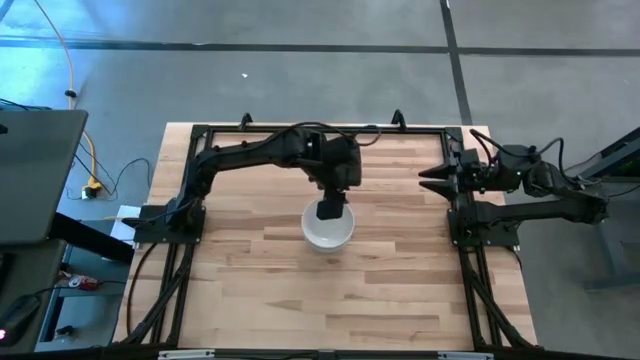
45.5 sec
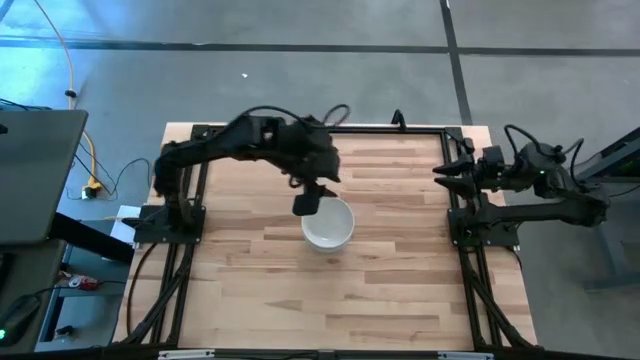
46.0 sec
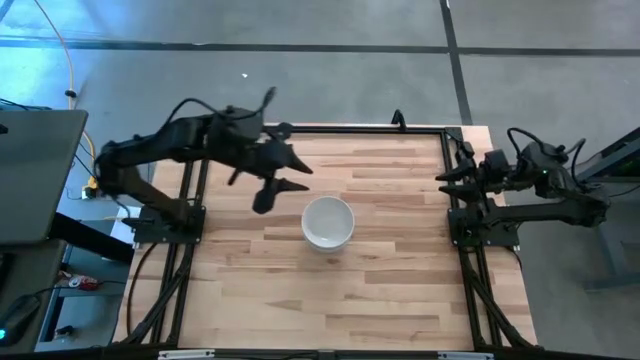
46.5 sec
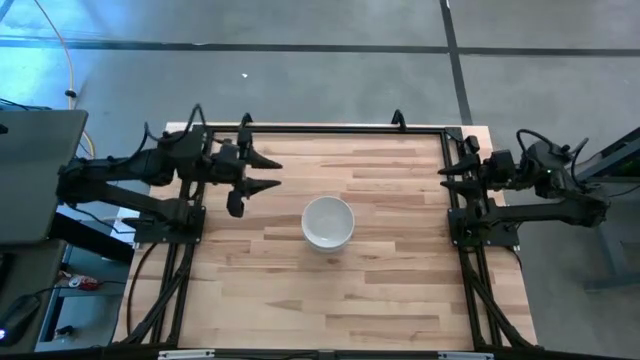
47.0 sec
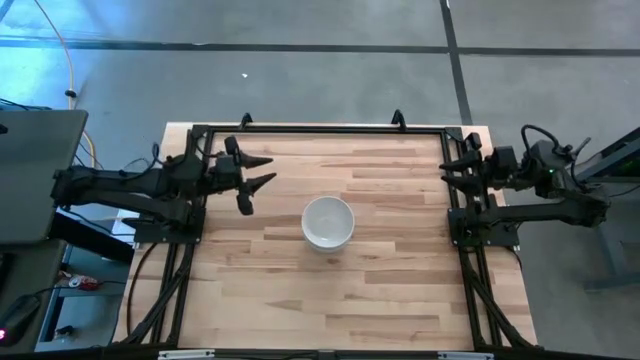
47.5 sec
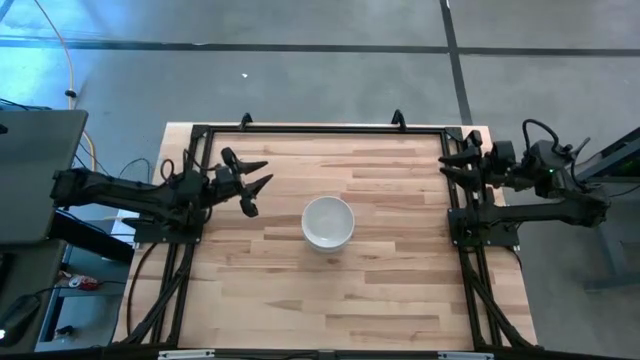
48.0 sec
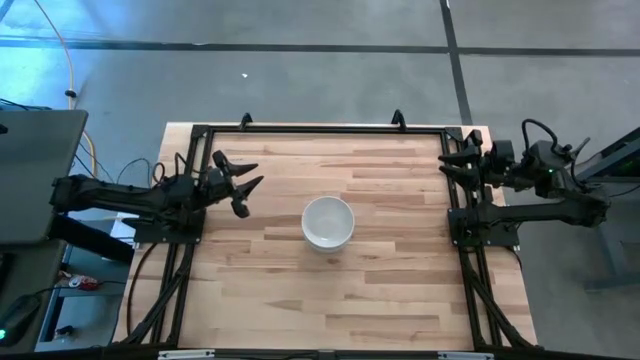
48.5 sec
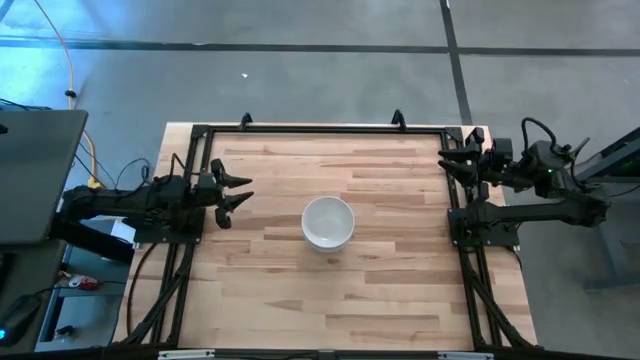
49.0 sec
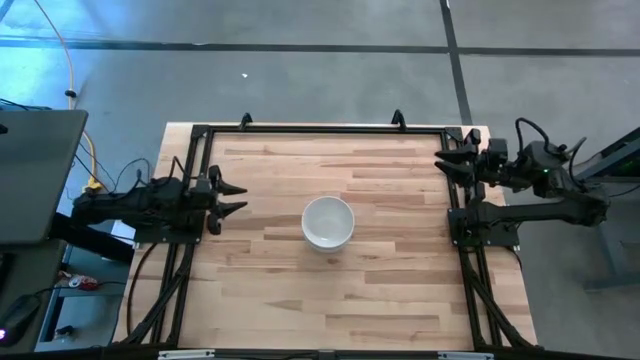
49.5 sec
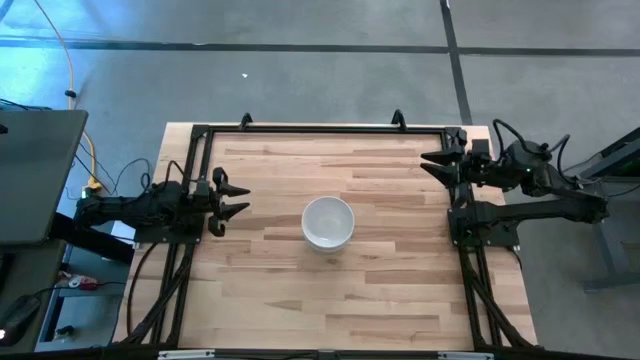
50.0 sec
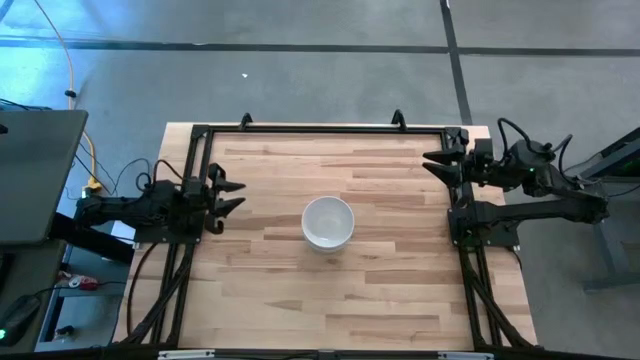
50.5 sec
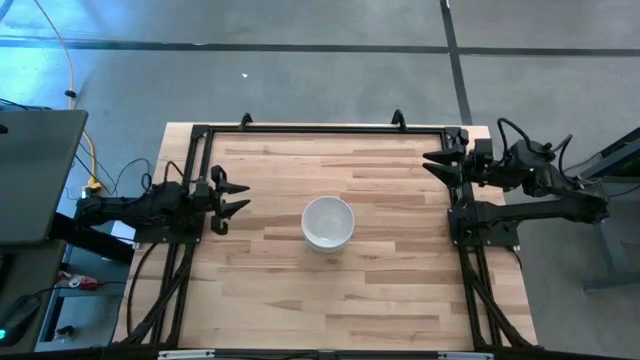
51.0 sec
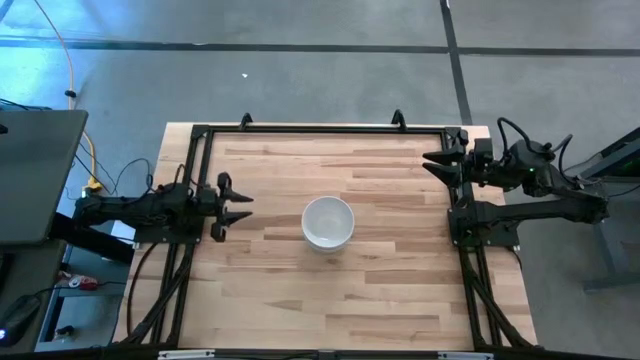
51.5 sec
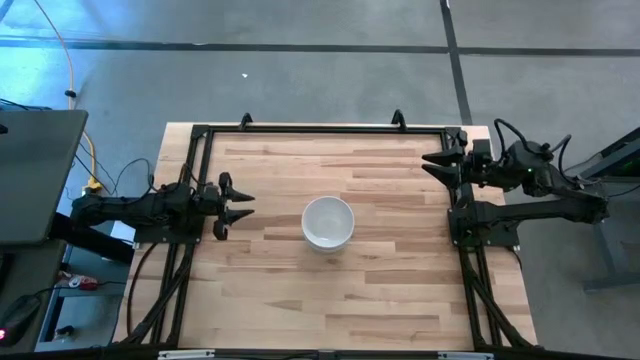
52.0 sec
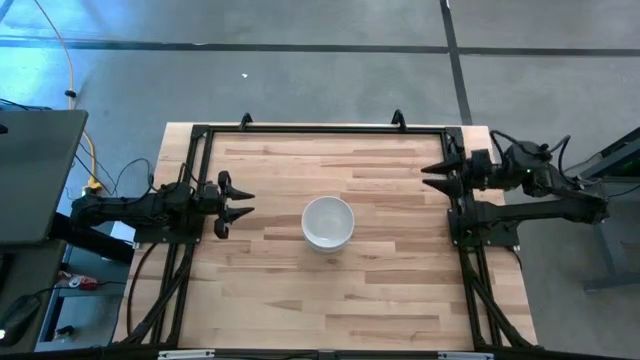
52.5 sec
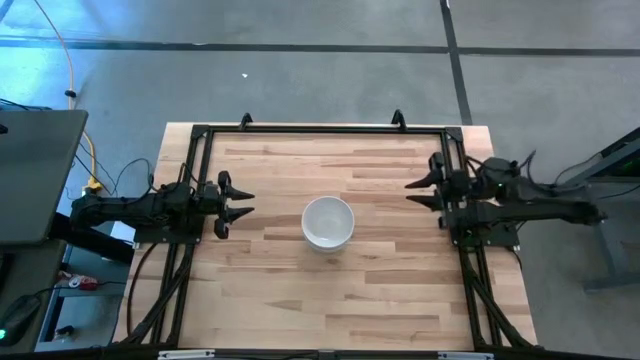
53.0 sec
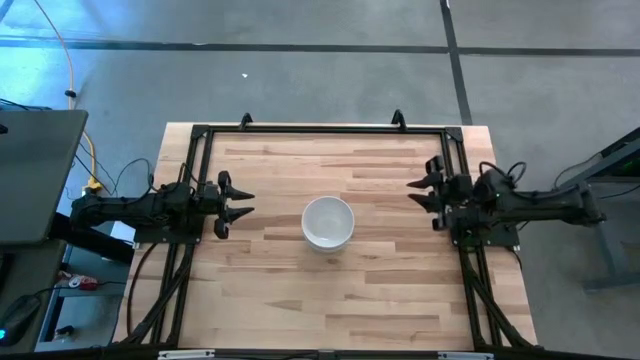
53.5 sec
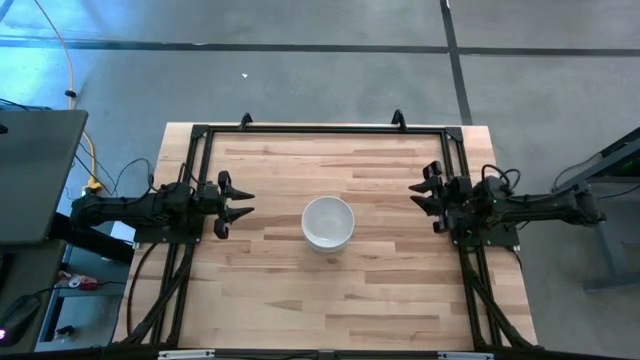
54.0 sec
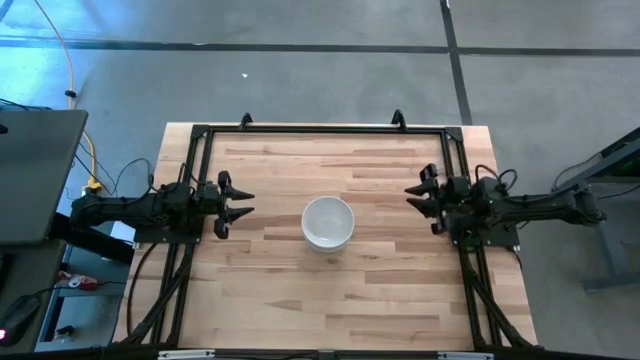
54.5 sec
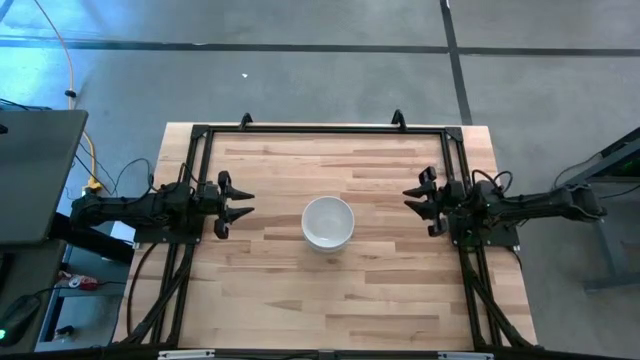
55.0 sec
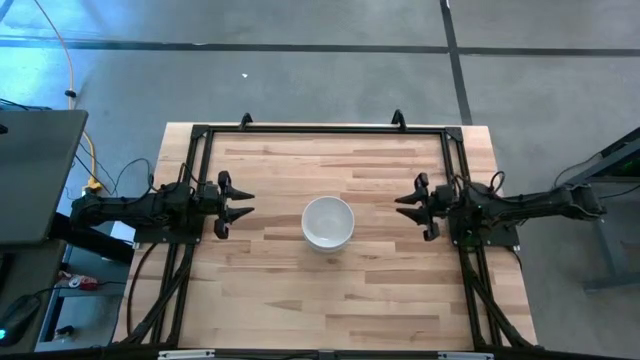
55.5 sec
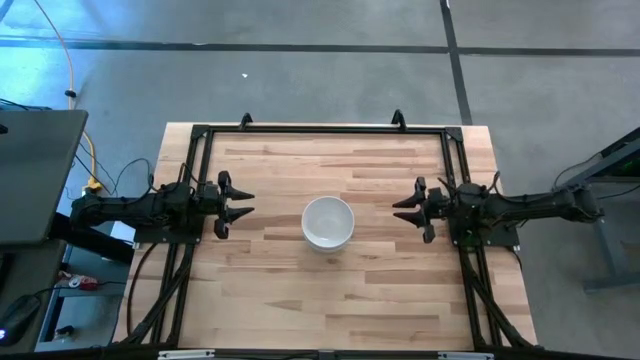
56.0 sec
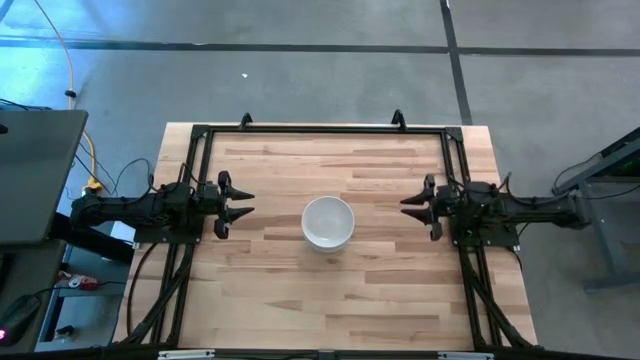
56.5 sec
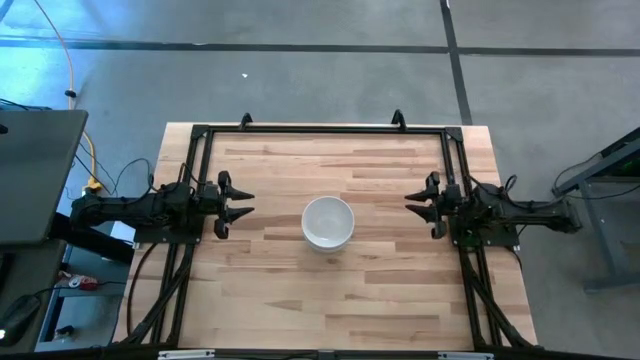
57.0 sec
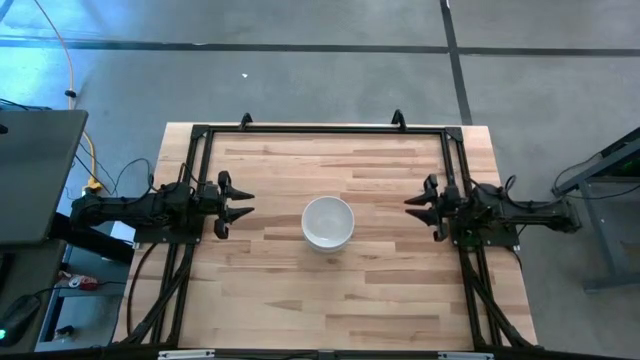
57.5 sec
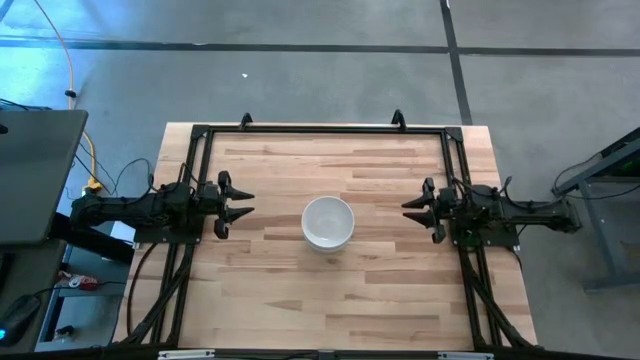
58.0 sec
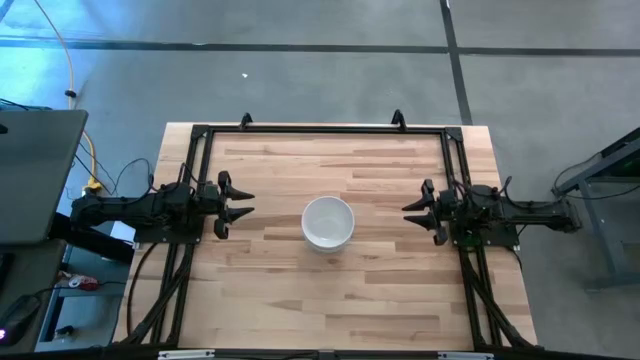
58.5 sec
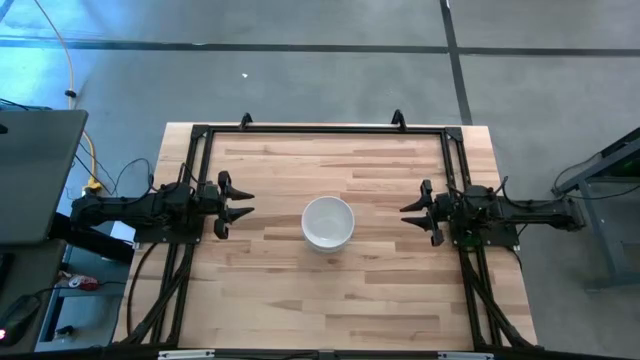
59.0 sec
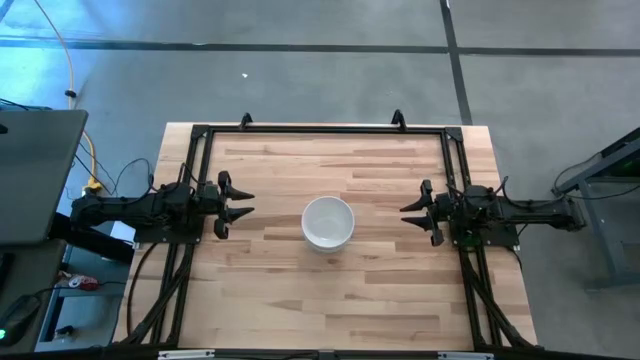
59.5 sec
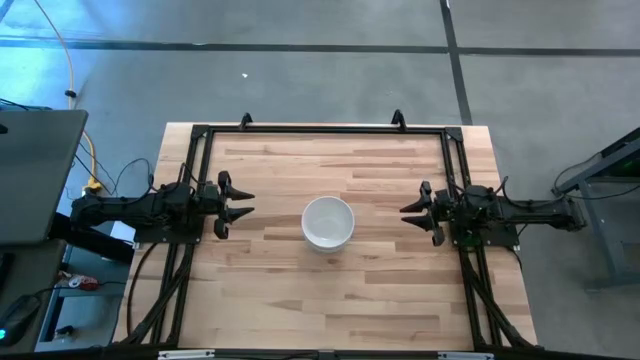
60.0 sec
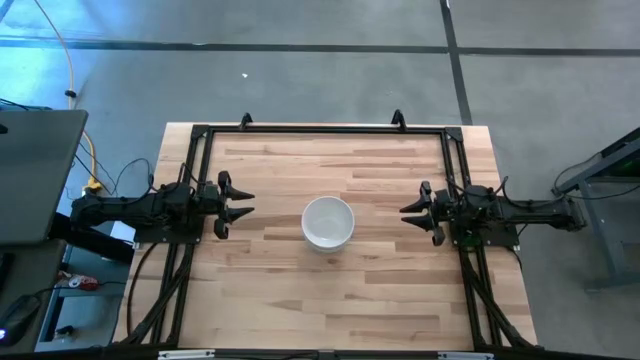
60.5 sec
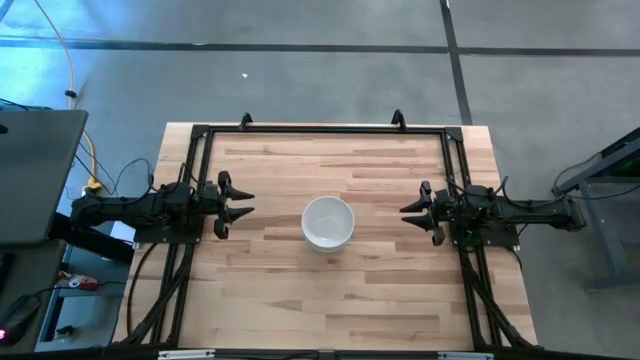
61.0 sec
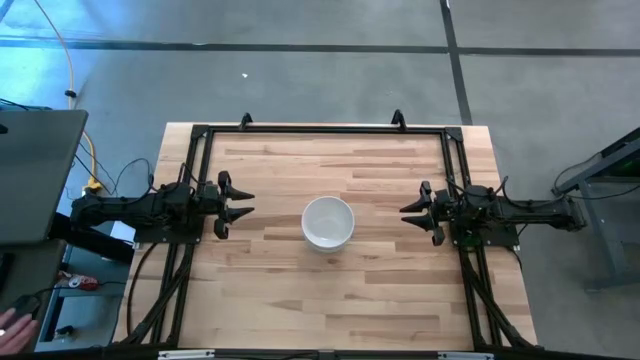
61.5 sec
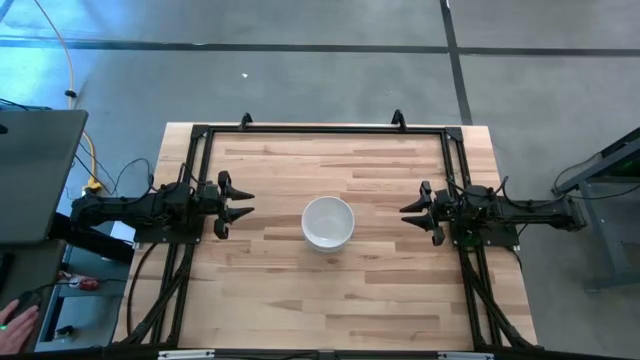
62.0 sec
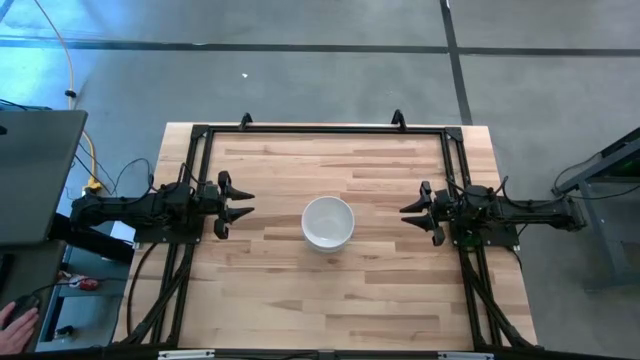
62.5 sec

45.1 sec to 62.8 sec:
Task: Nest bowls inside each other
Return to Home Position

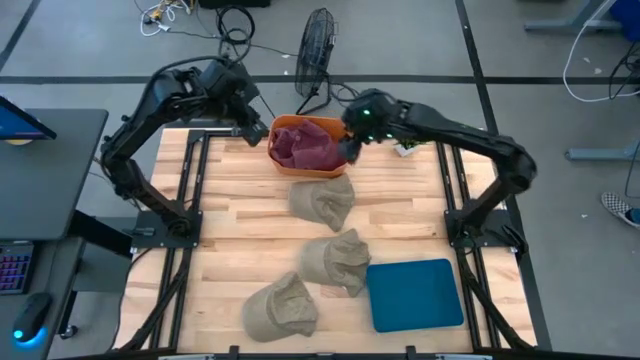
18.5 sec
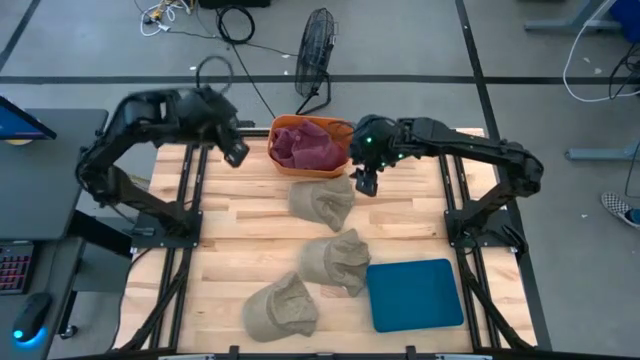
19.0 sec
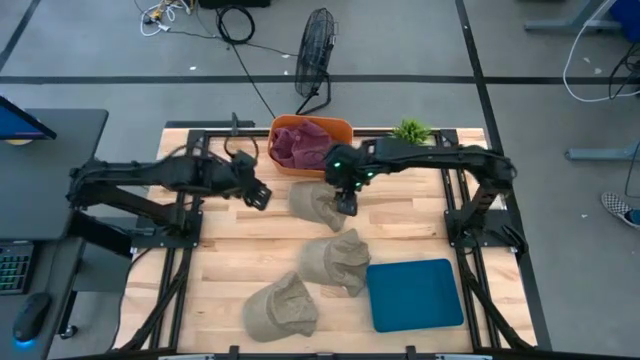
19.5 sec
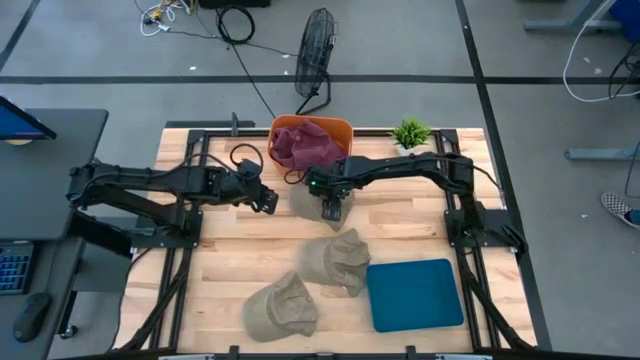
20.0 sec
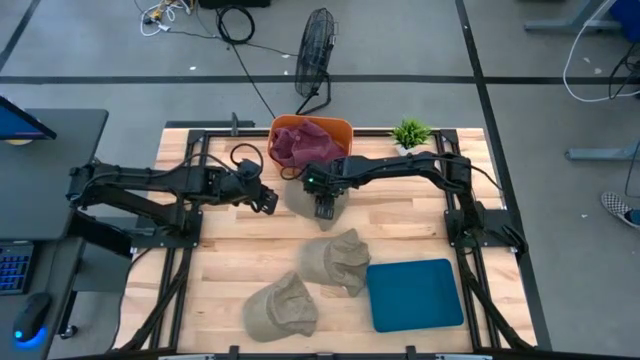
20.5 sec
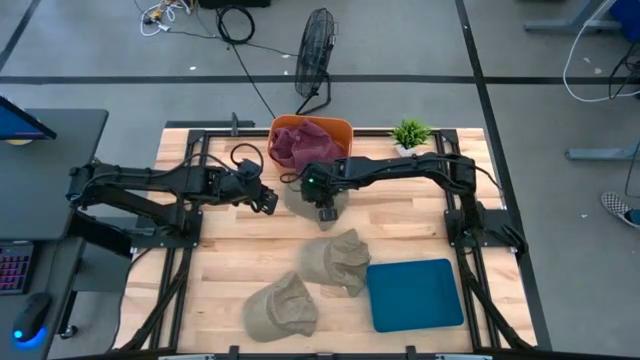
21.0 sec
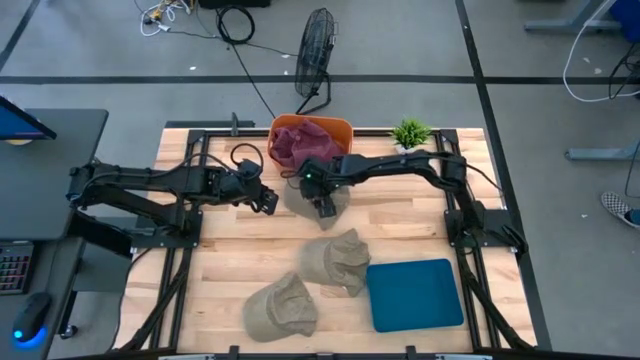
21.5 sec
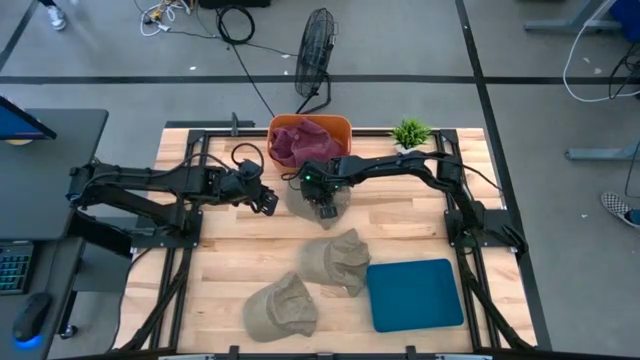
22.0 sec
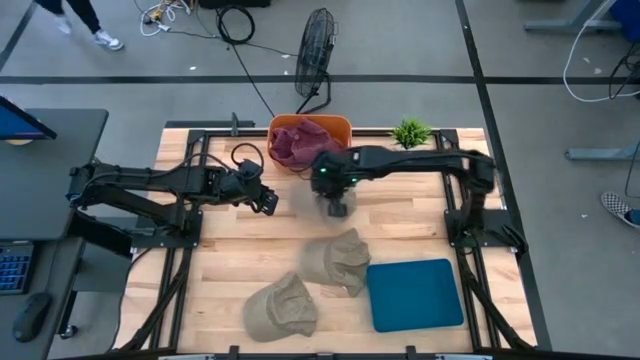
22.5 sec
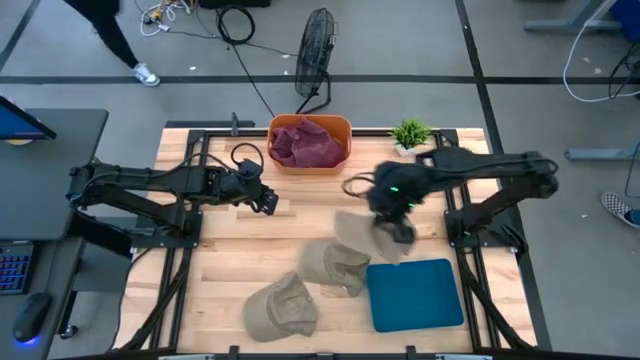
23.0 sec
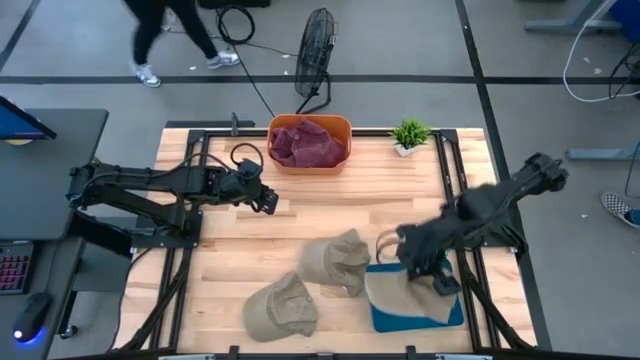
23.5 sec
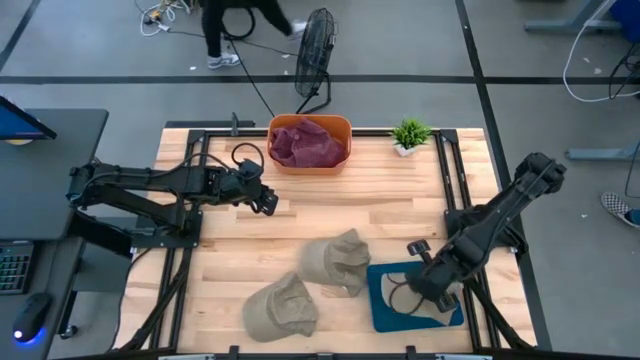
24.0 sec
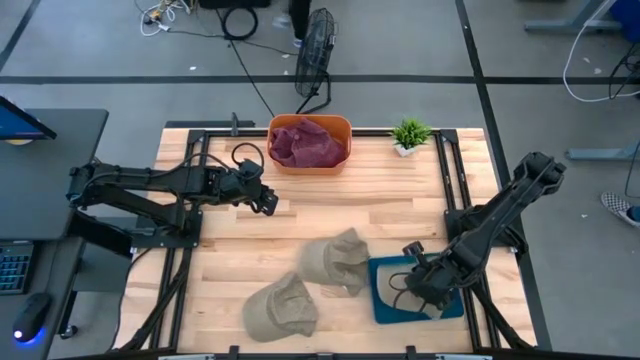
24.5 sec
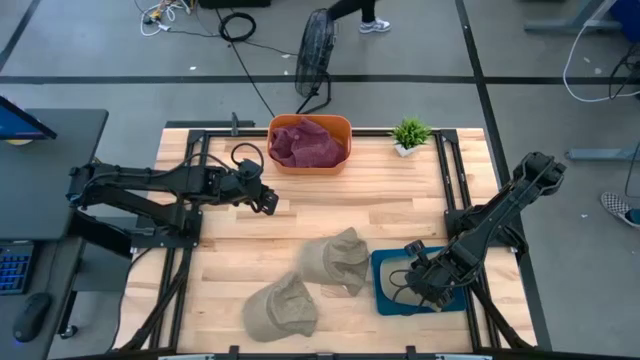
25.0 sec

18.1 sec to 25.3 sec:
Task: Pick & Place hat
Put the top brown cap into the blue bin
